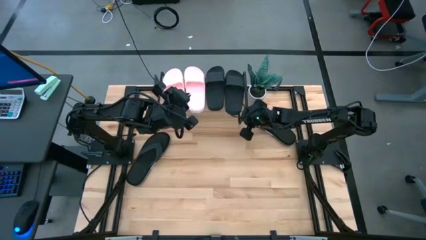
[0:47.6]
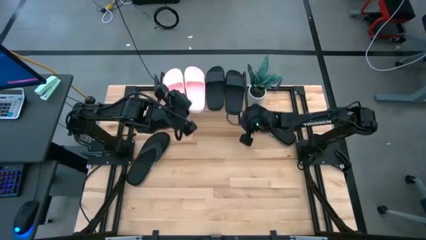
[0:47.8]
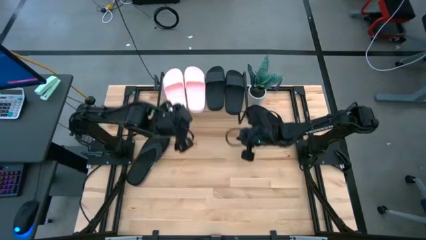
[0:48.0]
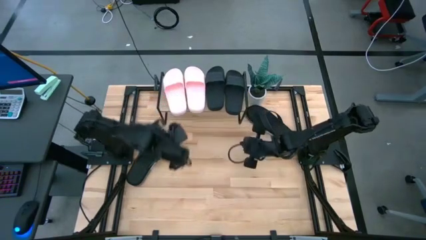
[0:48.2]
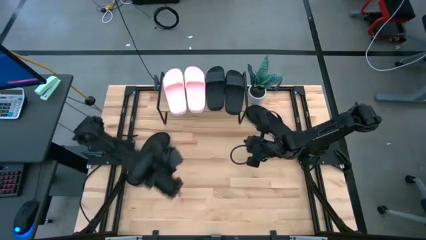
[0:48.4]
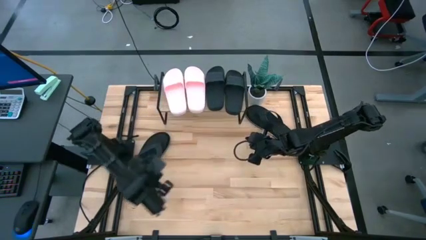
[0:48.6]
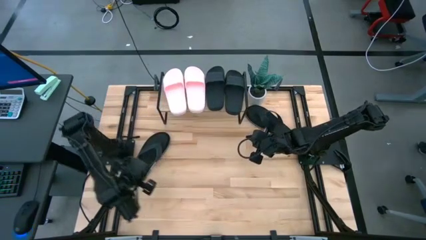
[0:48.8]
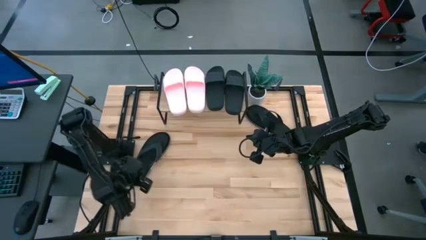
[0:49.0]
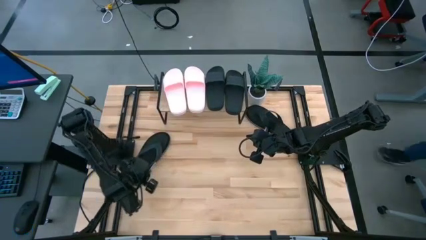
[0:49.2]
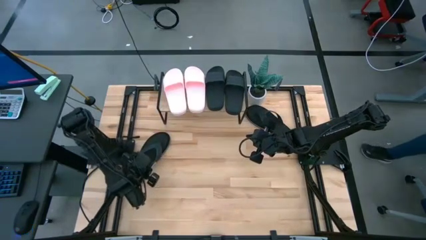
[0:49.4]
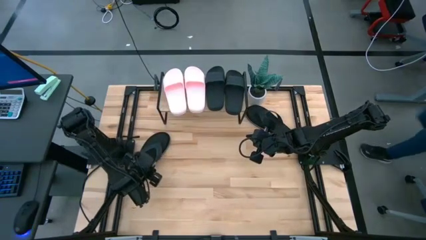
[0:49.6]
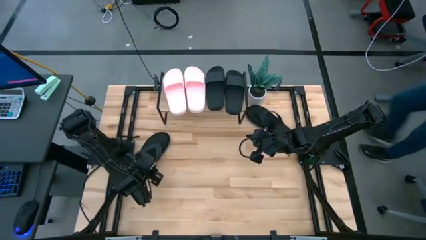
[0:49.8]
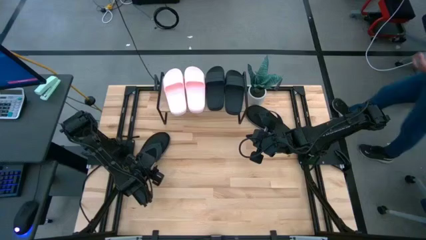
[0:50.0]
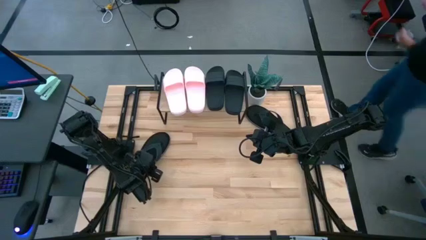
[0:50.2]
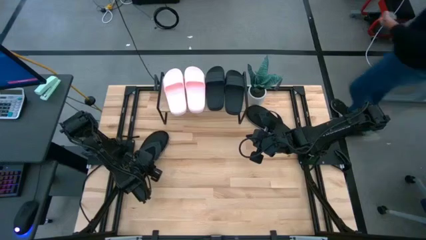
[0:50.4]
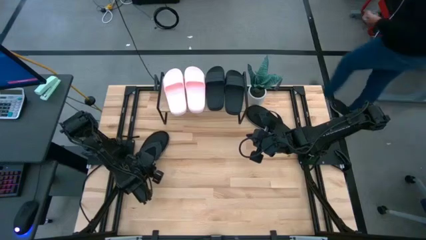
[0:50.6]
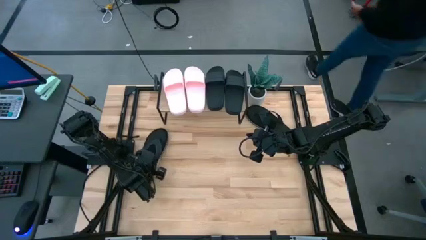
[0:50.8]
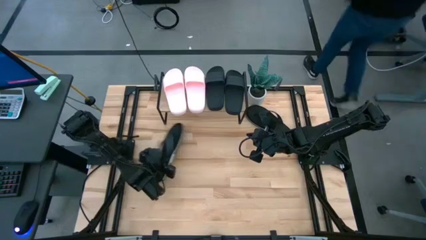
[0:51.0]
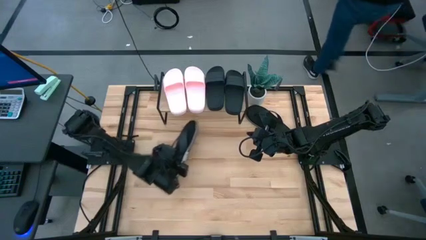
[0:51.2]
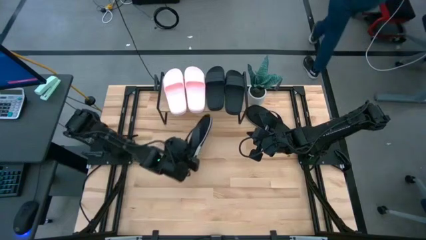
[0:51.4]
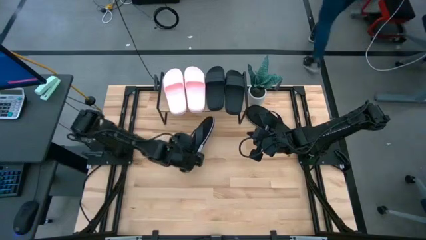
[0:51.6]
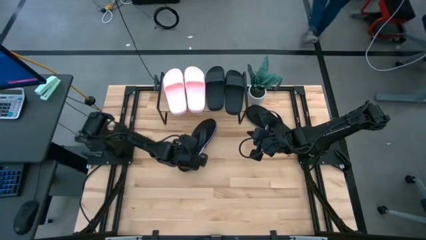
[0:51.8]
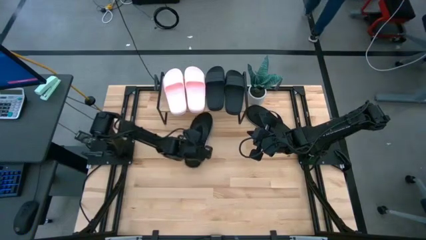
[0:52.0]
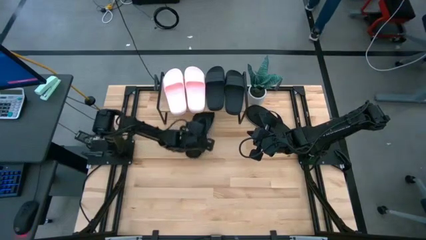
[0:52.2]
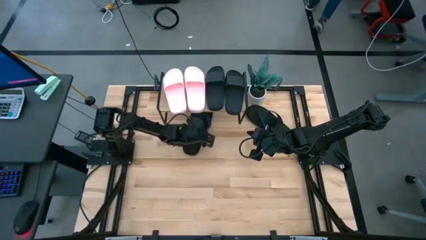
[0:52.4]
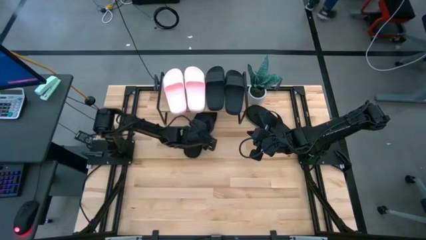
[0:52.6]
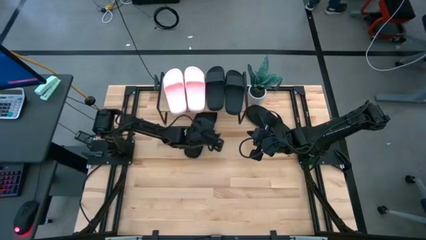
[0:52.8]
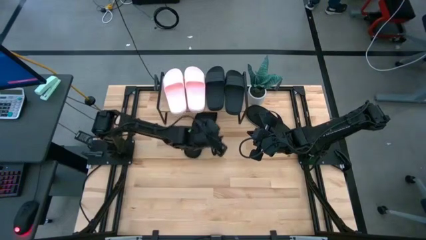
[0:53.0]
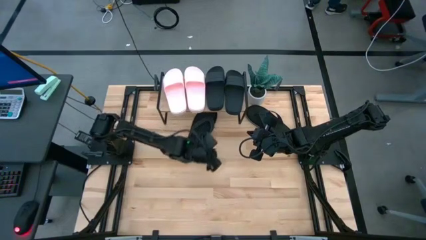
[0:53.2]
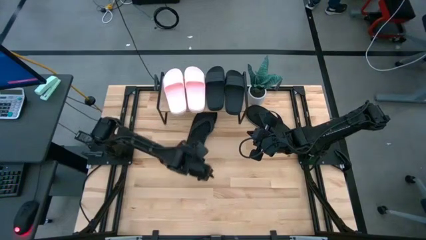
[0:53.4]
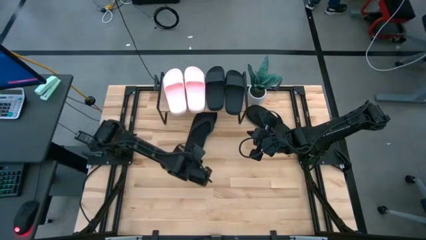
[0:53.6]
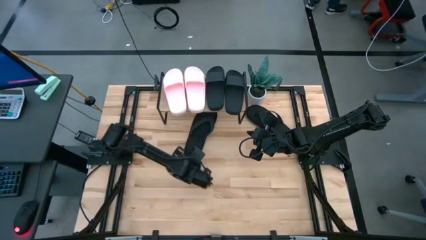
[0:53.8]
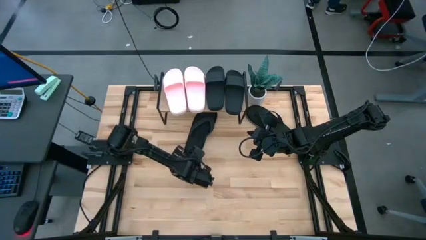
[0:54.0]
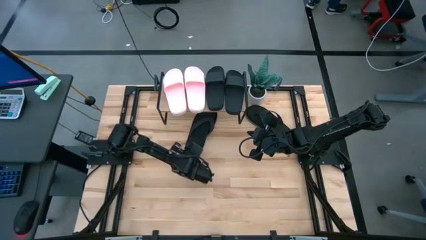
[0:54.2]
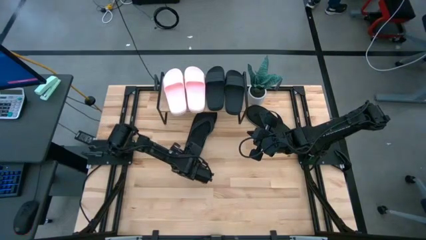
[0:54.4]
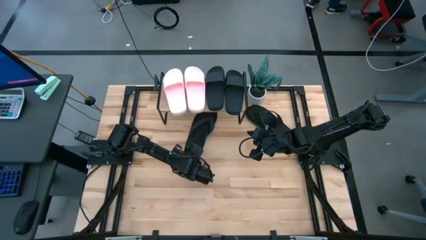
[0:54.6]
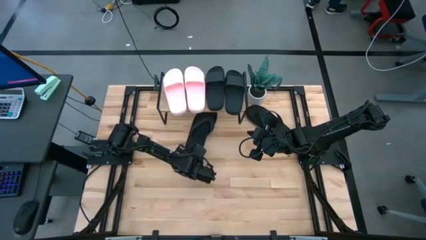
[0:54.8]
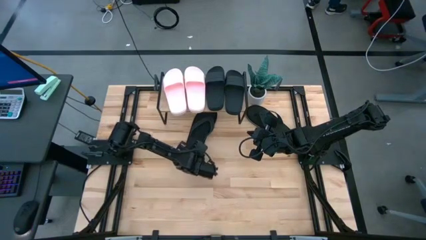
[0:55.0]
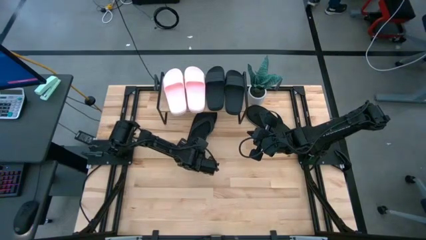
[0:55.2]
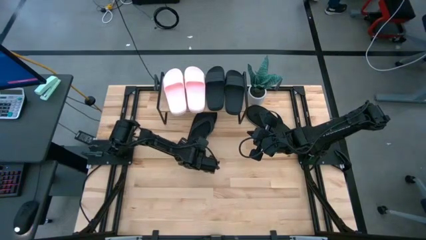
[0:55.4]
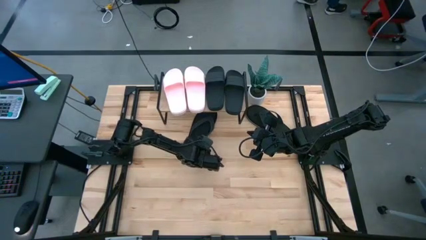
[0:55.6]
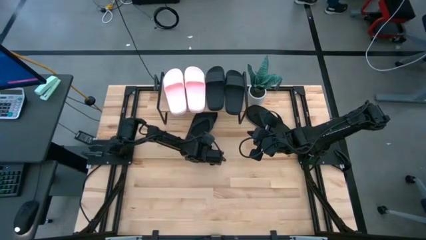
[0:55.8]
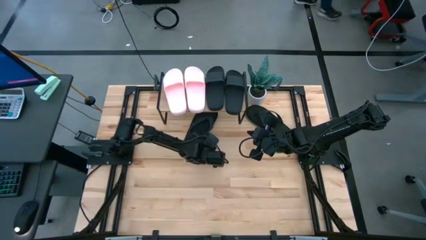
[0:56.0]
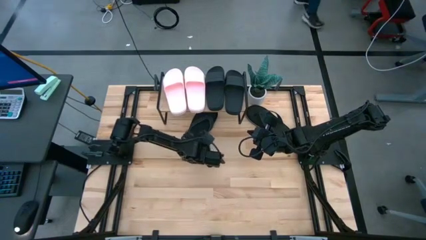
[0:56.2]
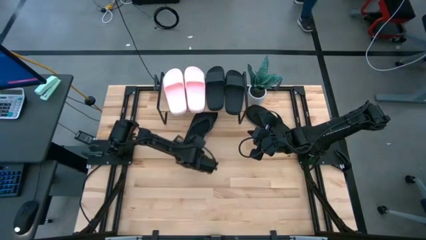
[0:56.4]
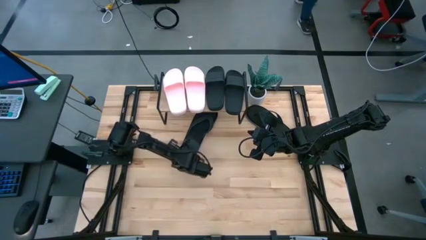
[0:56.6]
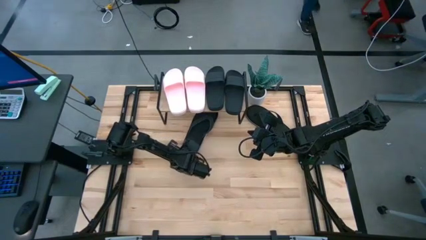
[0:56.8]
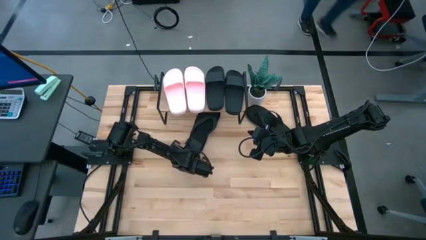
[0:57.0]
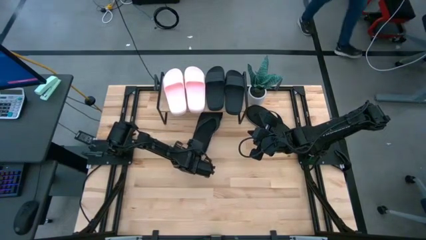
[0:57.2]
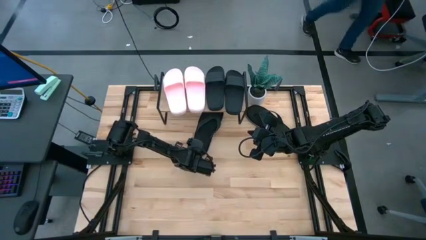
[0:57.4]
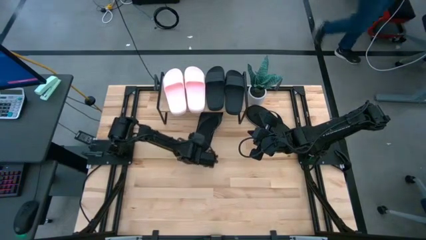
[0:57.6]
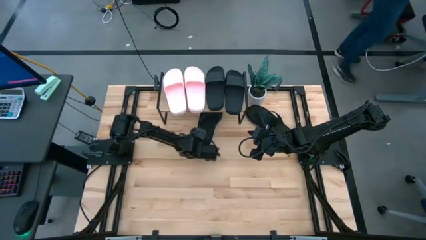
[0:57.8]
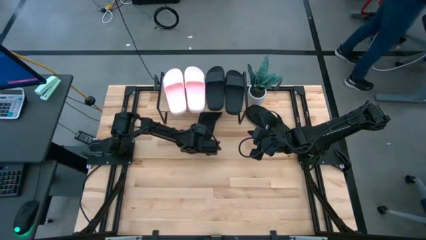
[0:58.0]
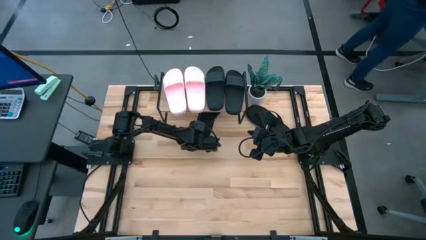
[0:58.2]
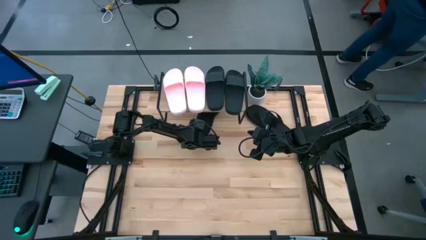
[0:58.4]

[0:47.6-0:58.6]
Task: Pick and place slides into the shelf
Put the left black slipper under the shelf

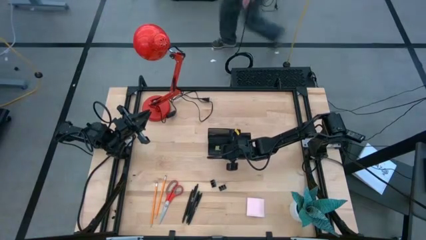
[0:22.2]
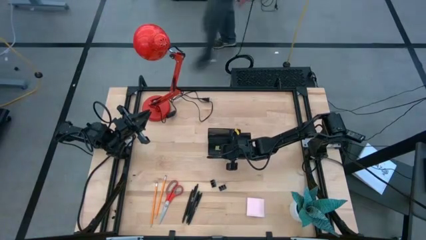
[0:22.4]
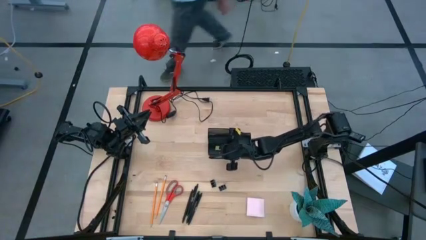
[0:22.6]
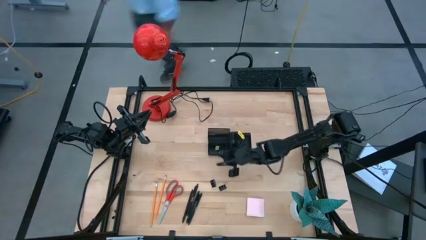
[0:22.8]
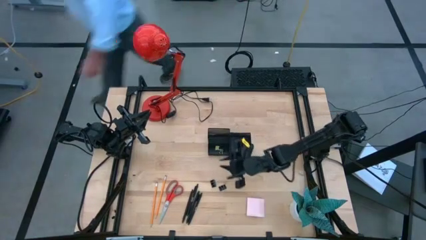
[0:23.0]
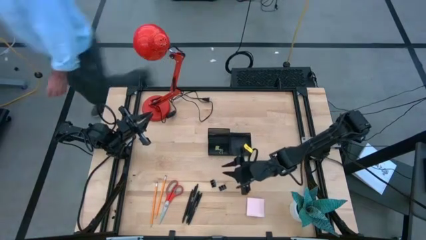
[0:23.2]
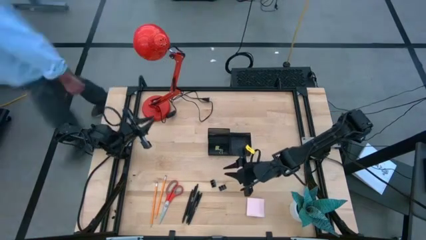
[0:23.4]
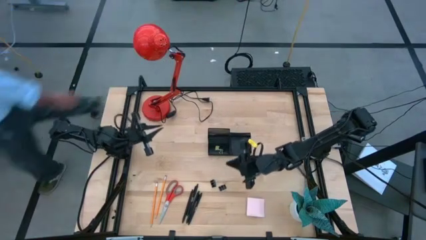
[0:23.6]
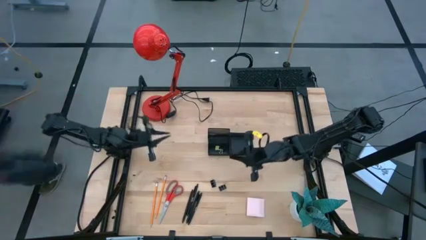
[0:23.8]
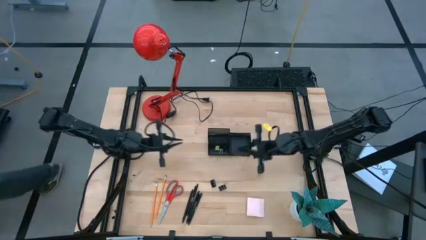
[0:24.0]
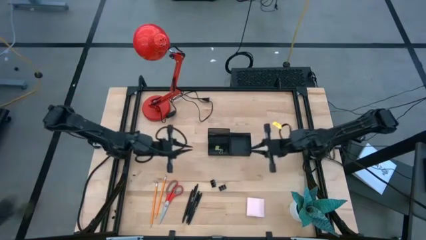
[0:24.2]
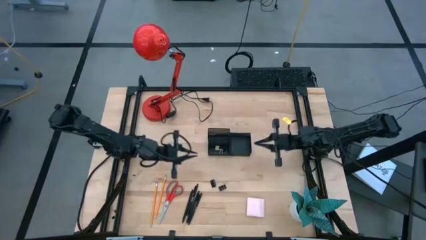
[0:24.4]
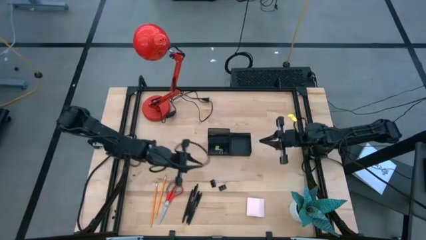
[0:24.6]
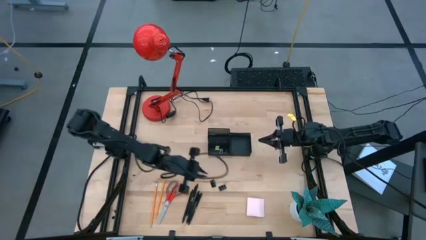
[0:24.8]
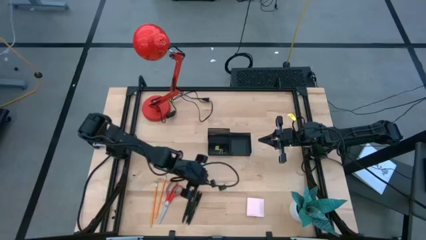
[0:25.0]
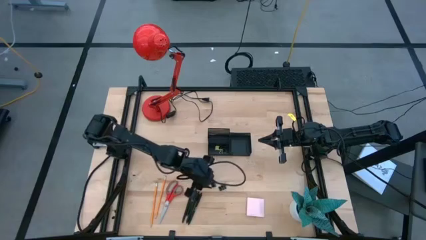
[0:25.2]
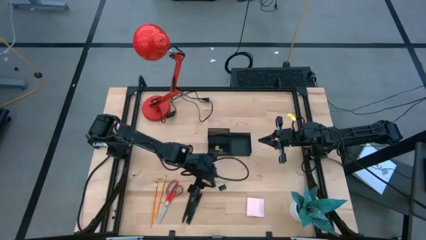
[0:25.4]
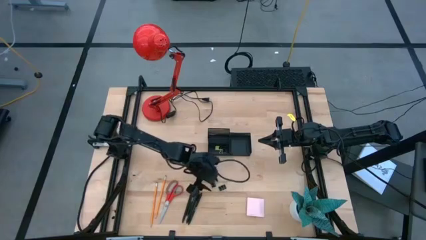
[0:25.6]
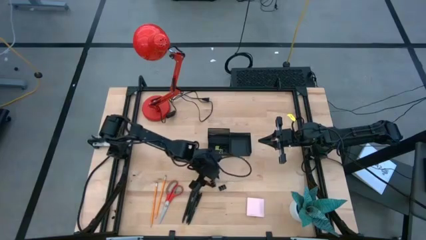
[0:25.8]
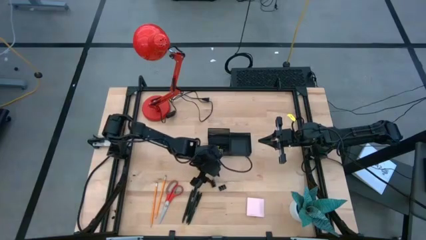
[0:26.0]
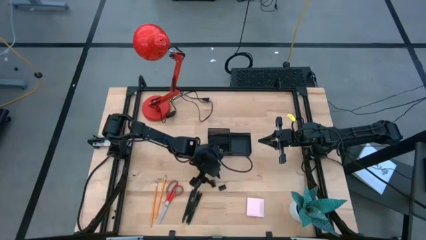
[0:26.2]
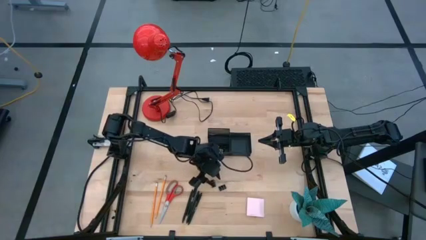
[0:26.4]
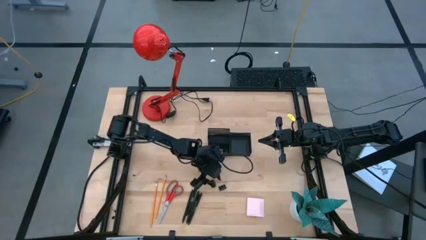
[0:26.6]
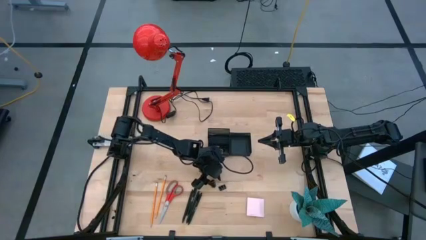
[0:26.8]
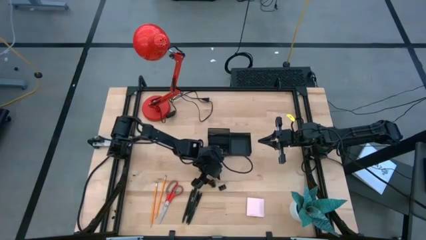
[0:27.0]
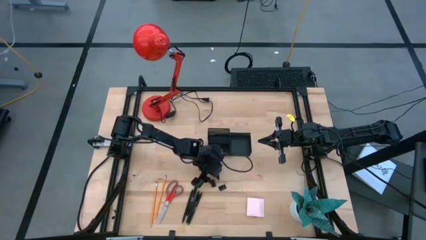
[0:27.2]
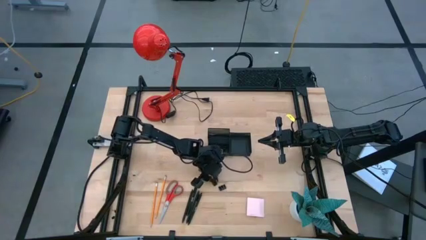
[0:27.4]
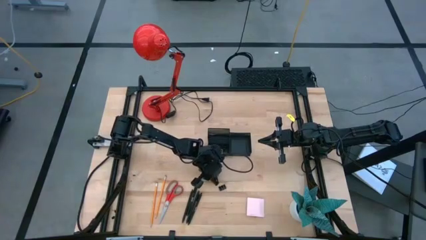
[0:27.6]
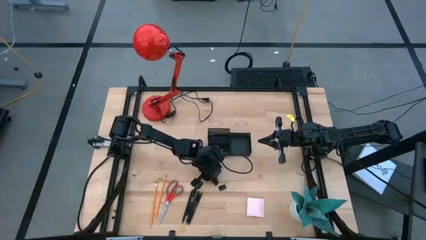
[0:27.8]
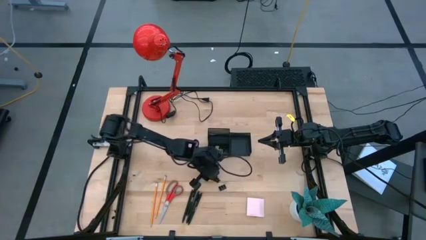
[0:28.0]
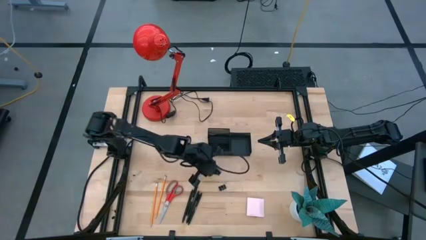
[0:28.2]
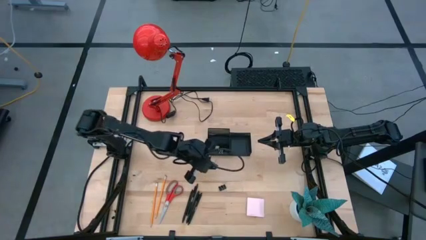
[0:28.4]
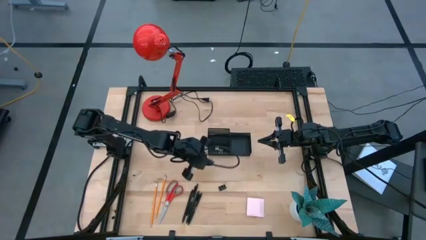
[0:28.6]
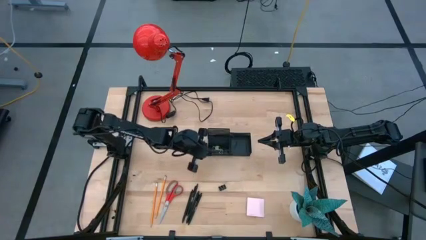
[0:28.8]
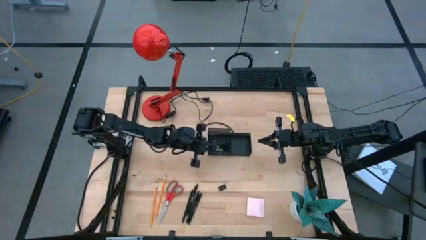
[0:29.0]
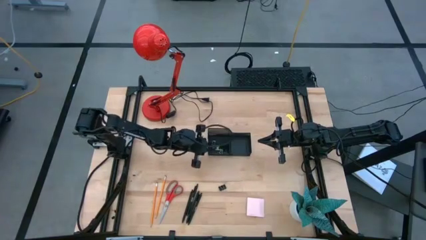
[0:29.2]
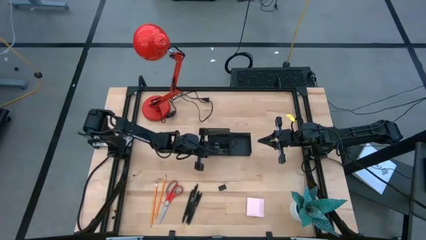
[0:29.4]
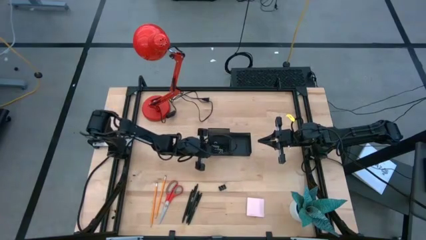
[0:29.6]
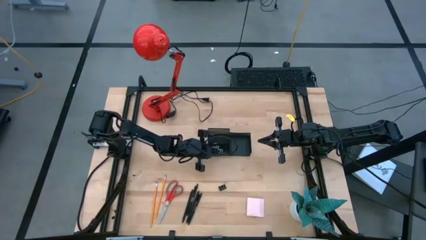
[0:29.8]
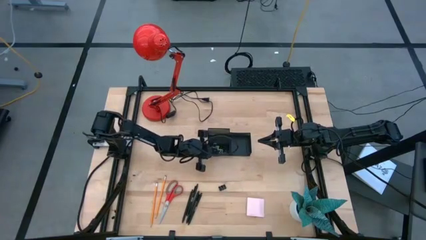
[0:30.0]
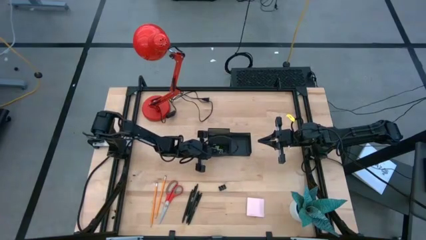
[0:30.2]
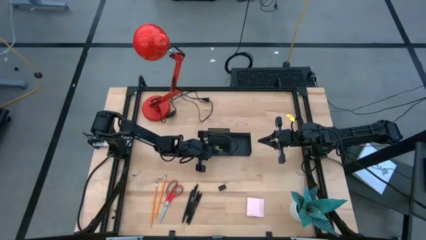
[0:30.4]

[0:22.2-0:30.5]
Task: Pick and place office supplies into organizer
Put the left black binder clip into the black desk organizer
